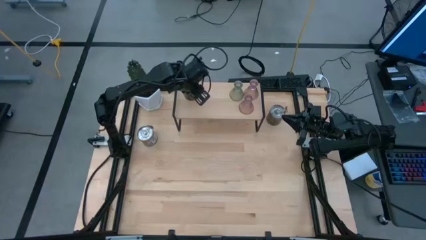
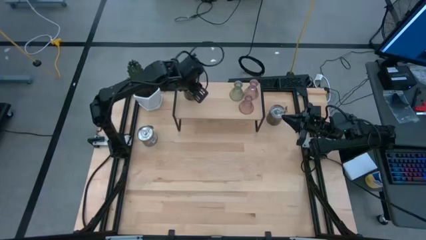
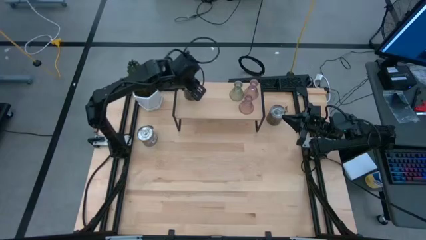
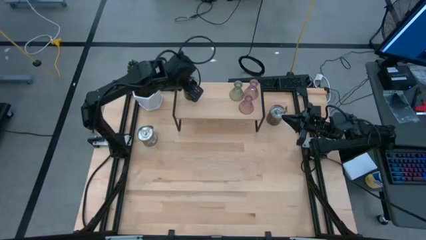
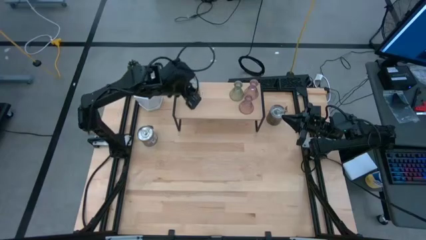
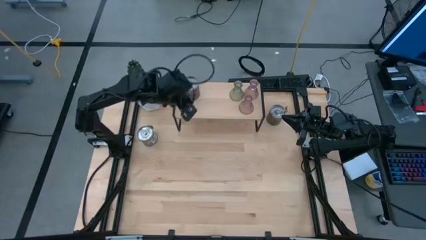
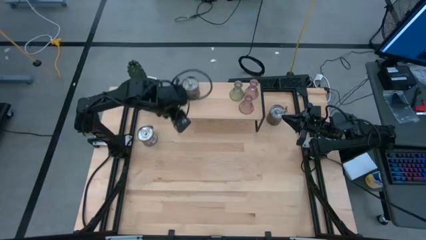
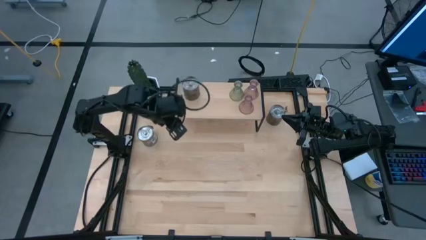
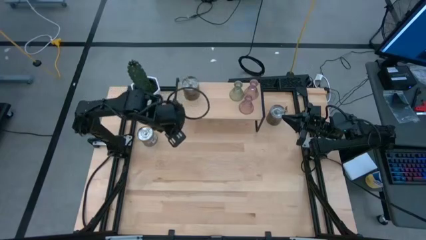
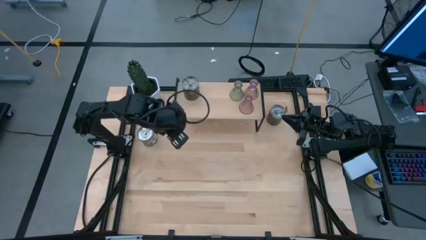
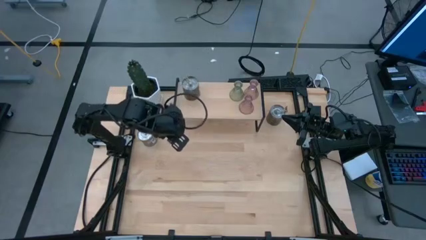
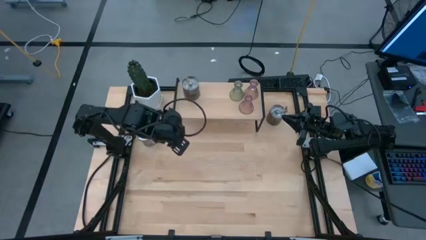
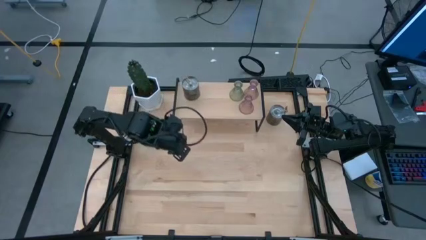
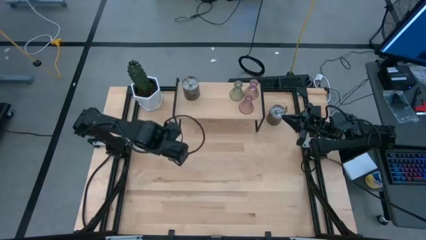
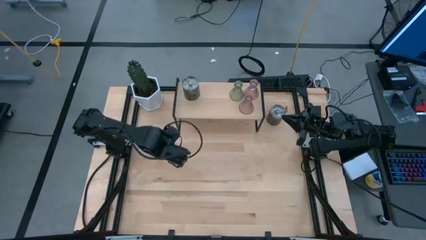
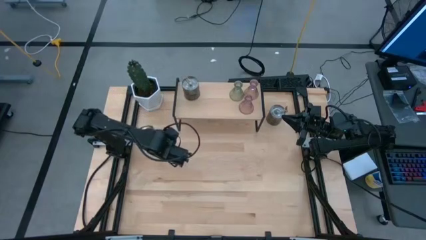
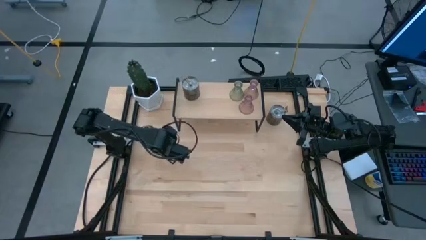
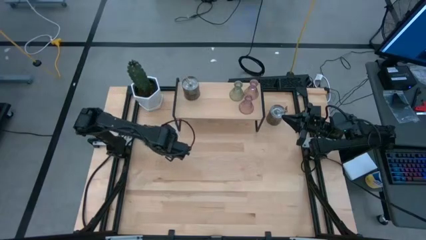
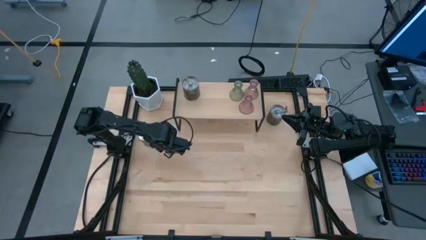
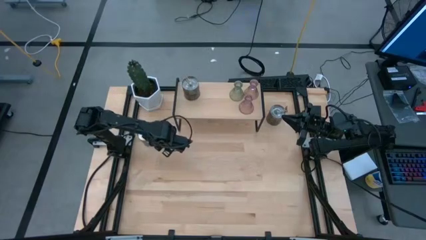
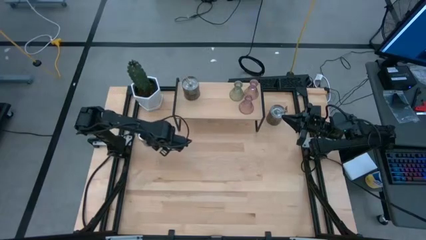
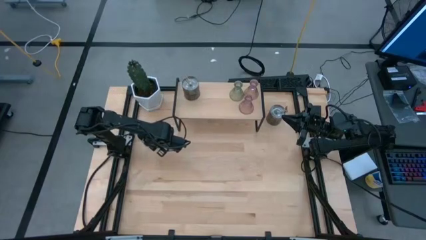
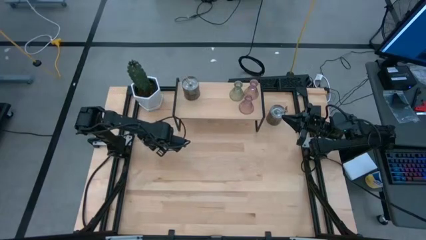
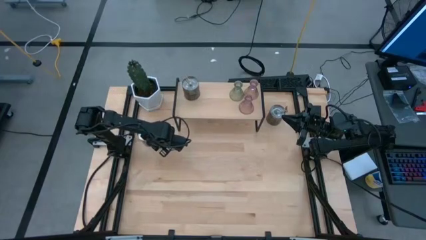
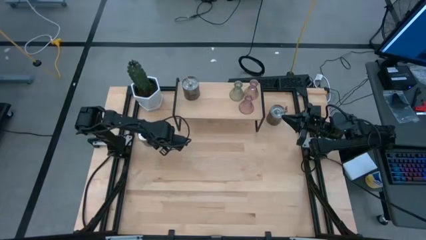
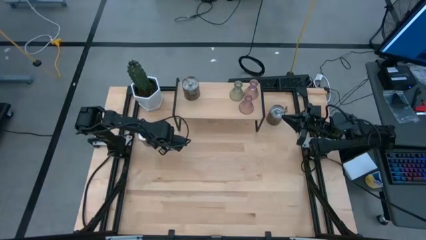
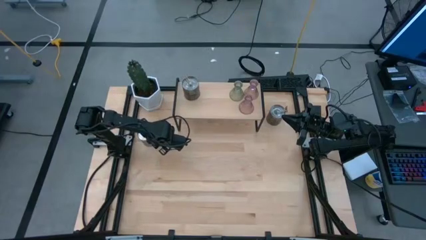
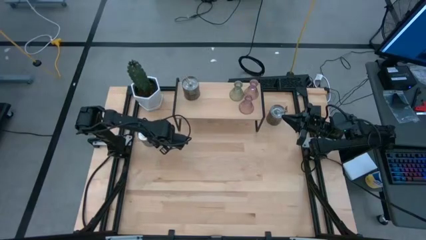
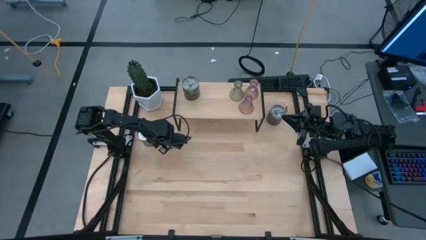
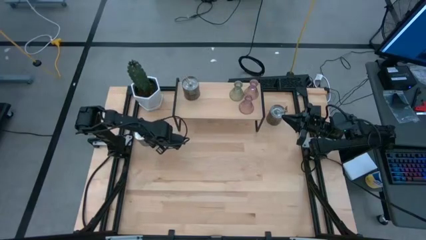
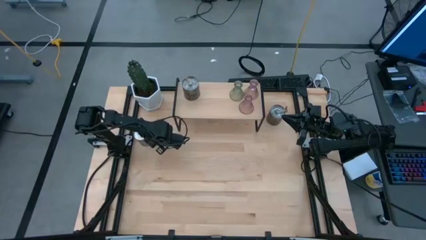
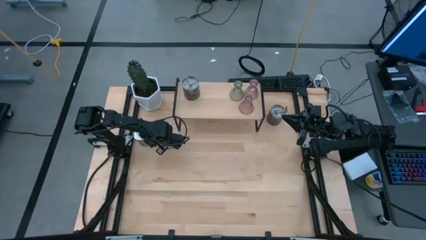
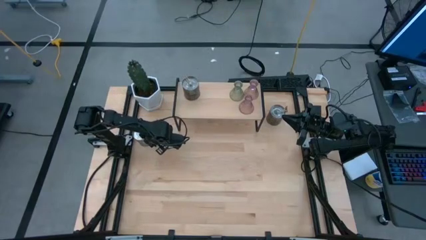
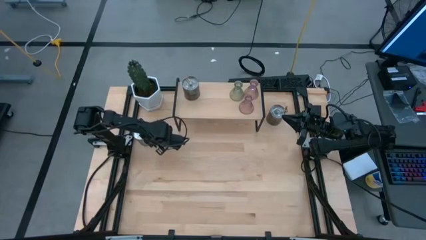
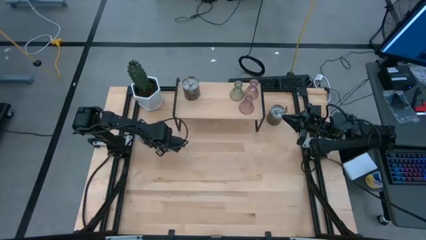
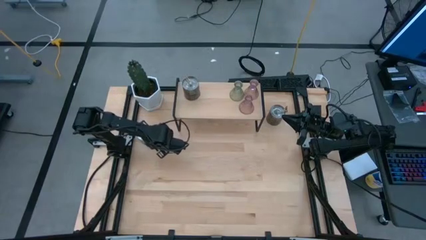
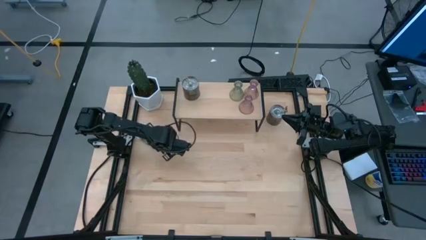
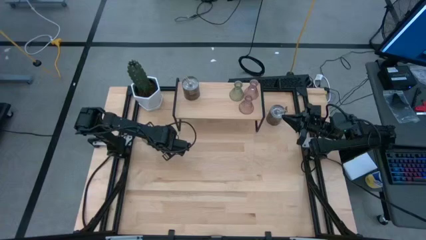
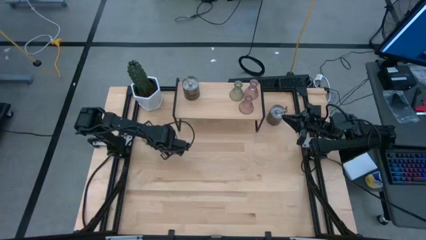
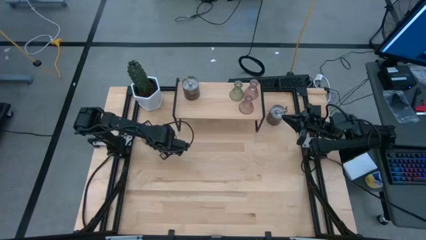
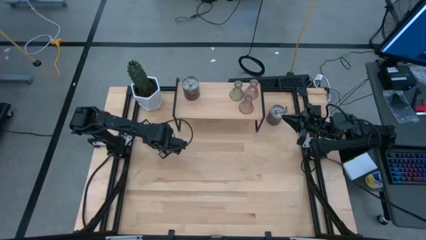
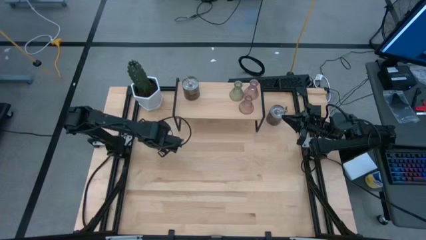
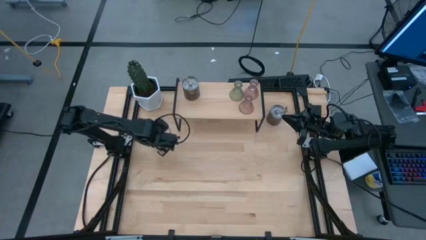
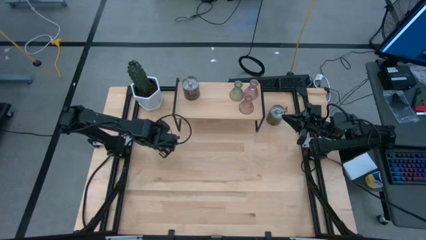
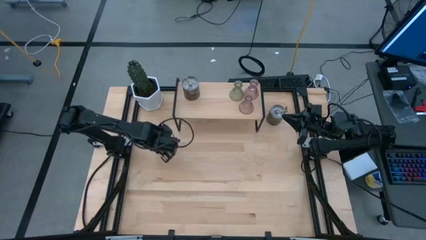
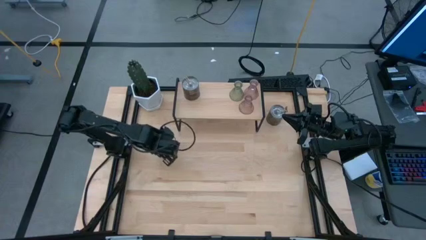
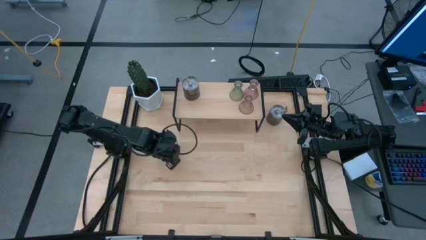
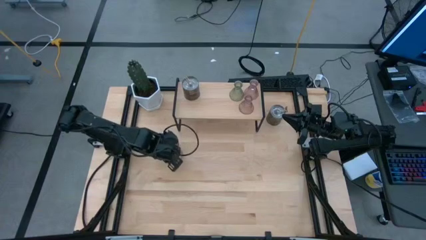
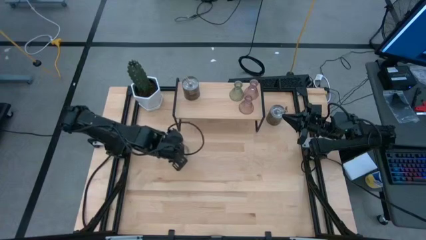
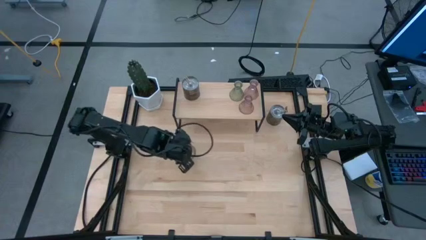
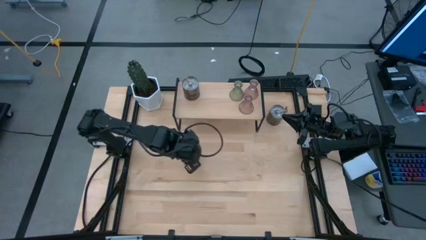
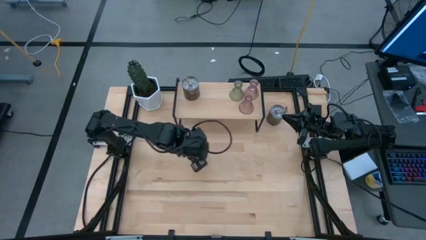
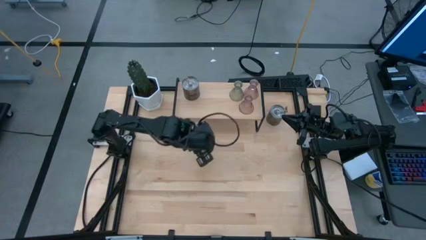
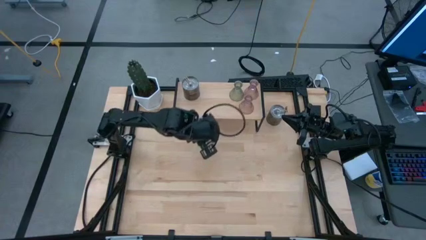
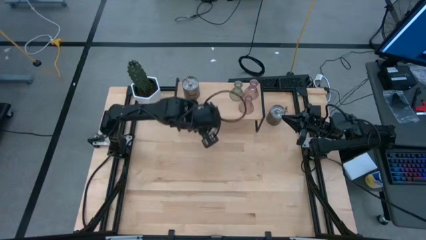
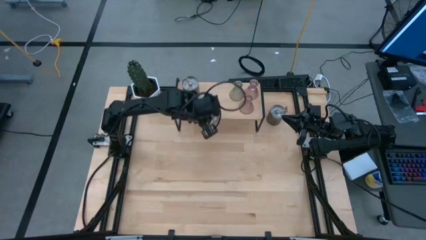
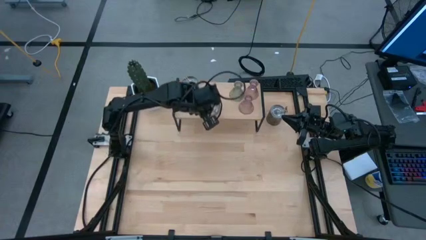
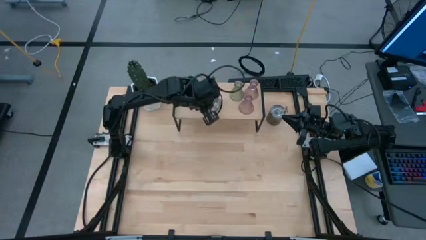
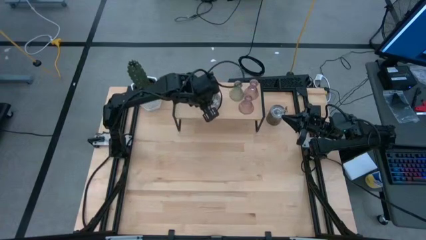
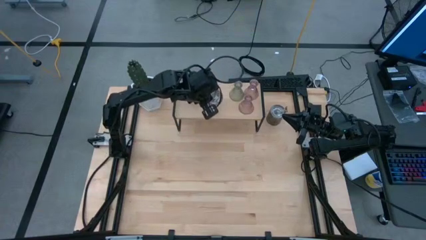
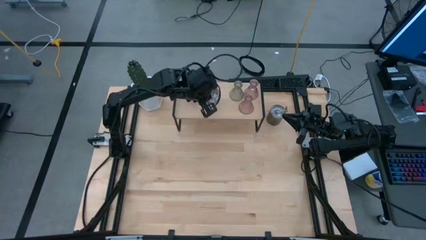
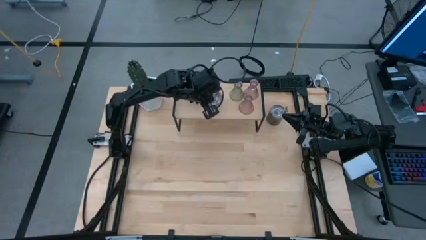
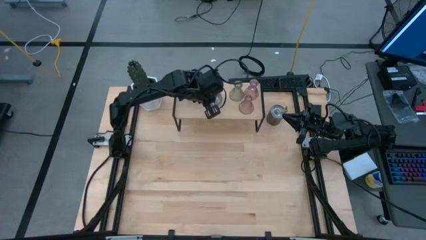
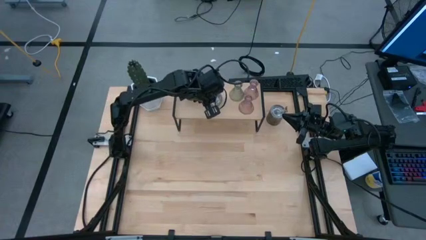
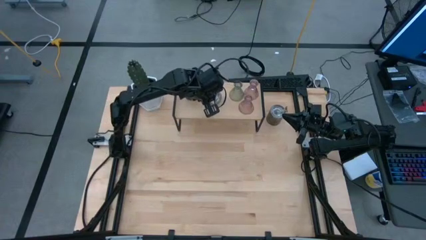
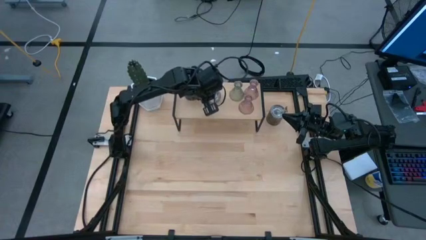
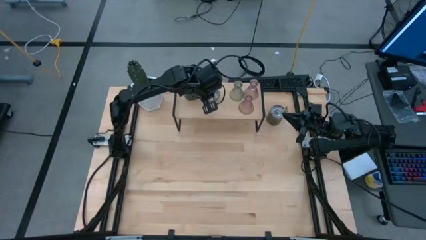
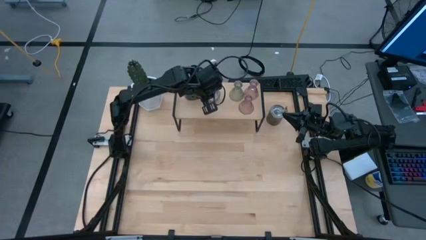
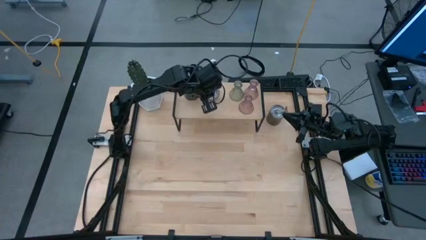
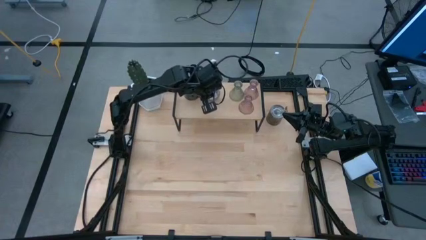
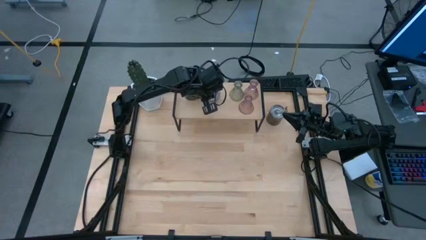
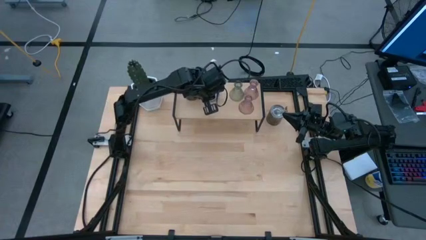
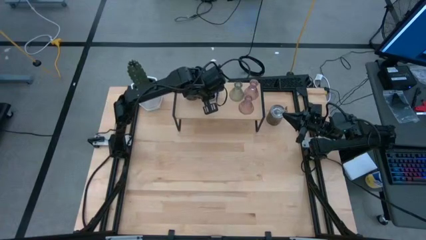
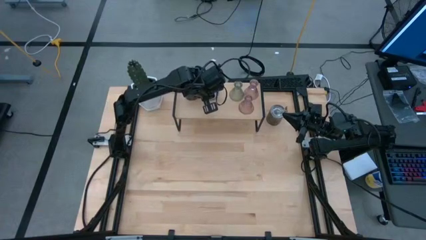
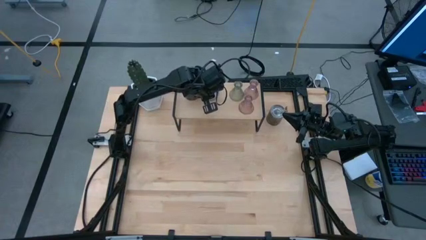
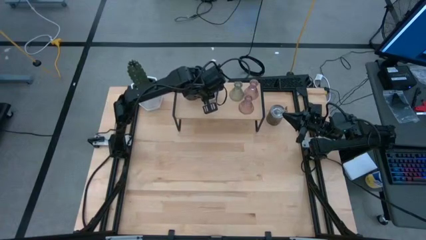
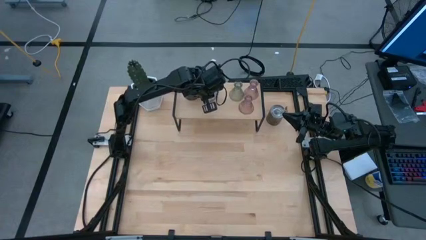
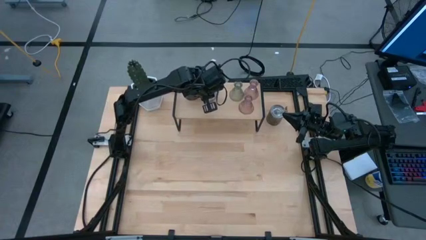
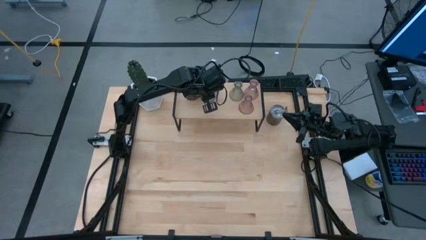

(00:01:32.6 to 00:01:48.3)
Task: Pick & Place candle stick holders
Put the left brown scented candle on the shelf
